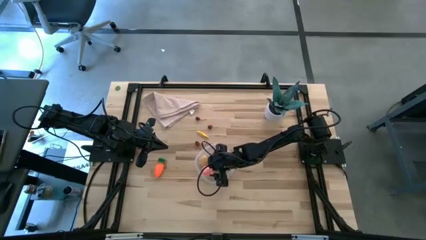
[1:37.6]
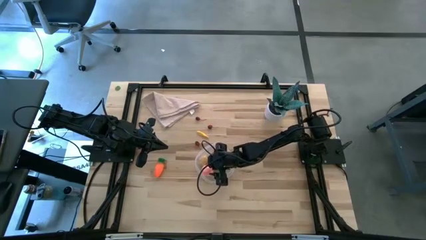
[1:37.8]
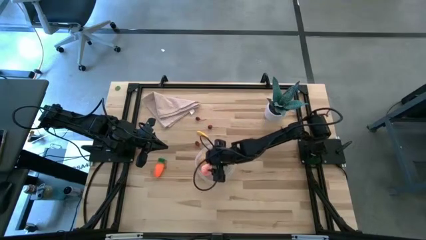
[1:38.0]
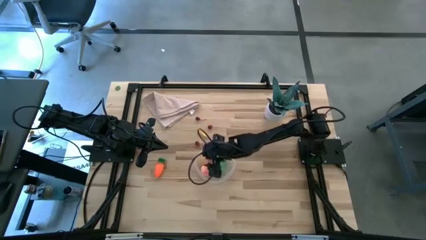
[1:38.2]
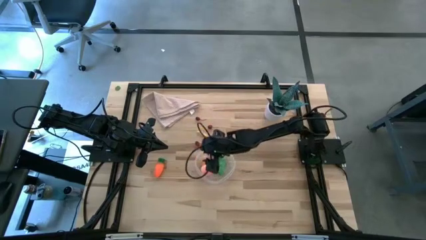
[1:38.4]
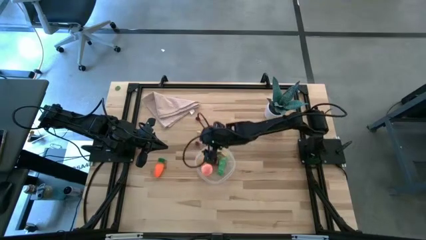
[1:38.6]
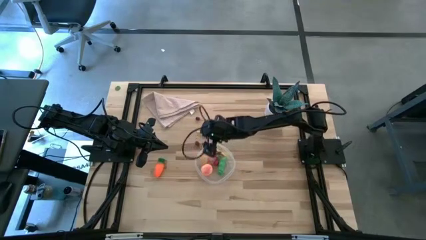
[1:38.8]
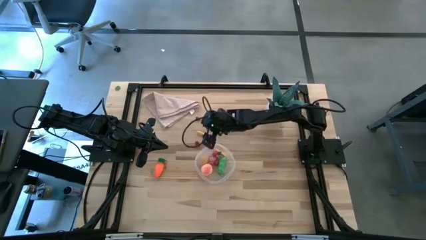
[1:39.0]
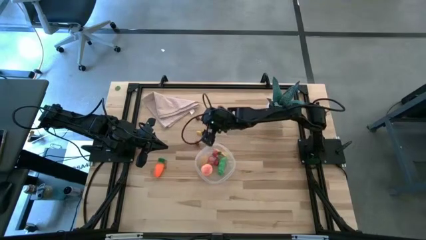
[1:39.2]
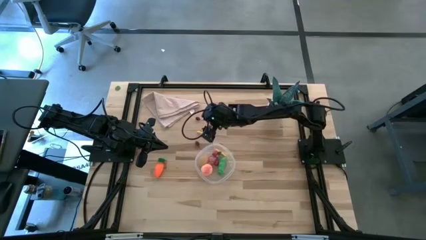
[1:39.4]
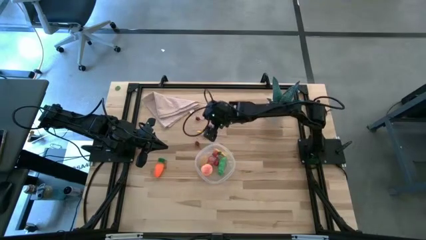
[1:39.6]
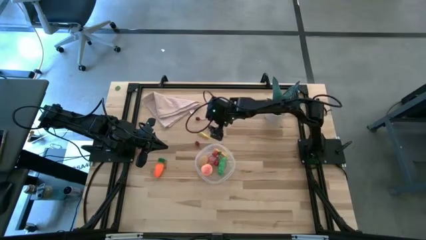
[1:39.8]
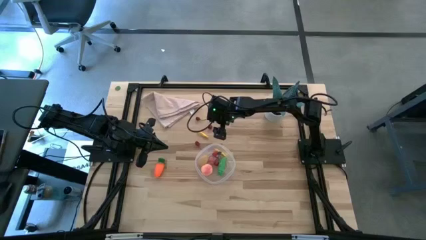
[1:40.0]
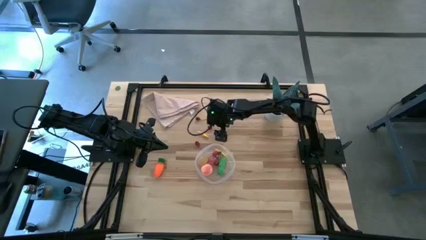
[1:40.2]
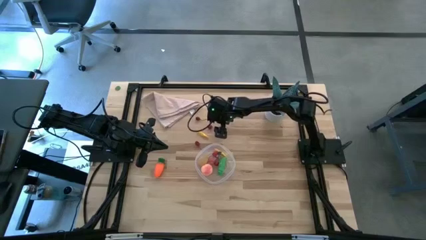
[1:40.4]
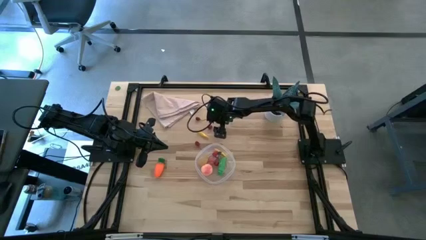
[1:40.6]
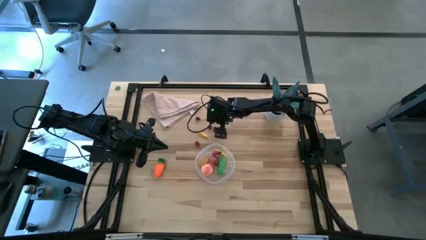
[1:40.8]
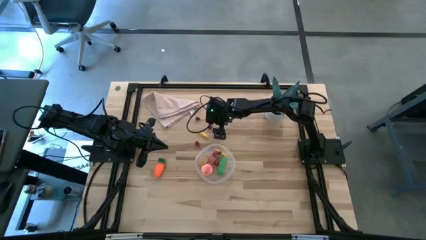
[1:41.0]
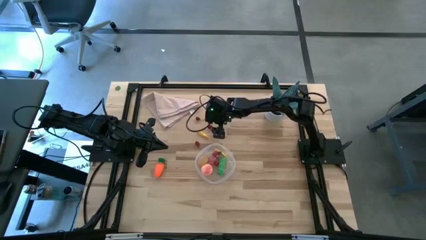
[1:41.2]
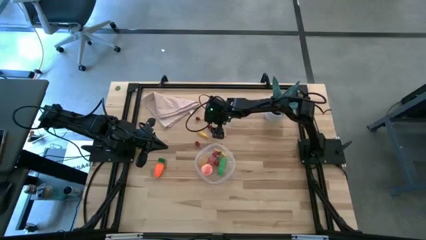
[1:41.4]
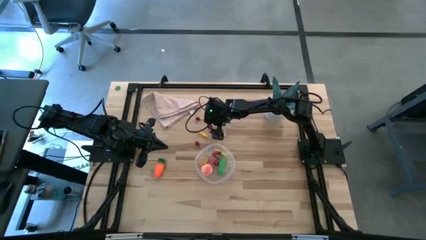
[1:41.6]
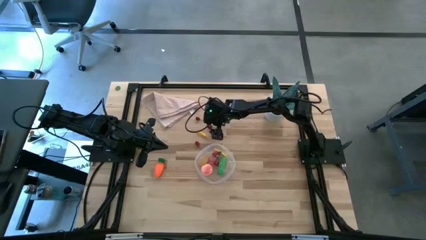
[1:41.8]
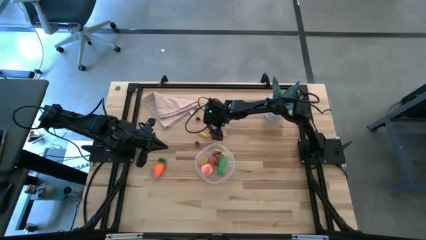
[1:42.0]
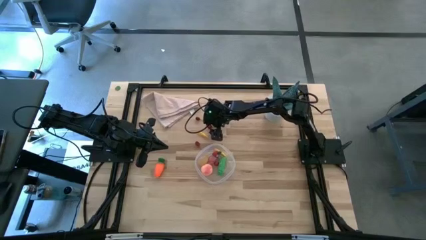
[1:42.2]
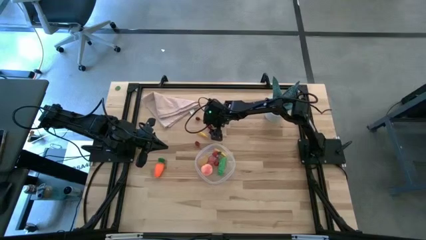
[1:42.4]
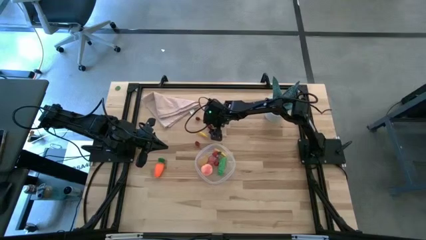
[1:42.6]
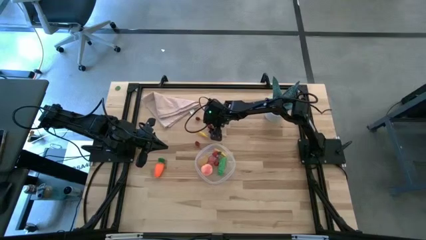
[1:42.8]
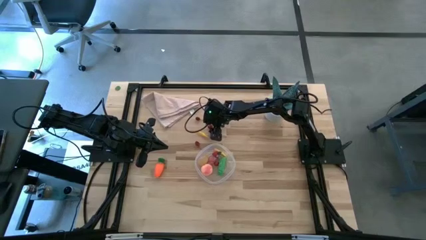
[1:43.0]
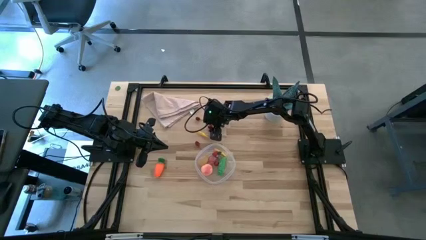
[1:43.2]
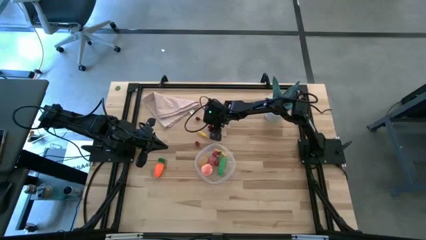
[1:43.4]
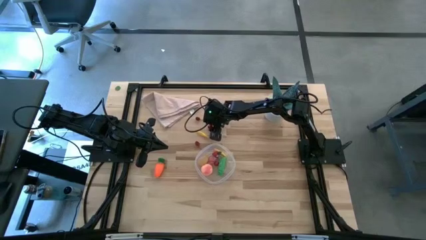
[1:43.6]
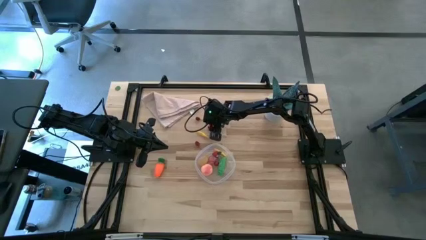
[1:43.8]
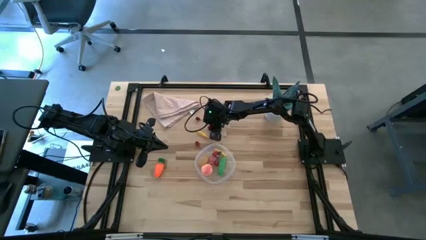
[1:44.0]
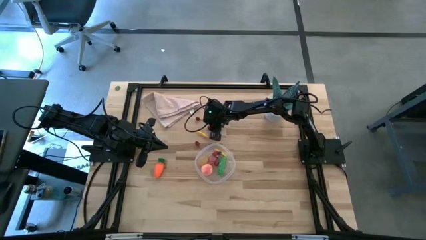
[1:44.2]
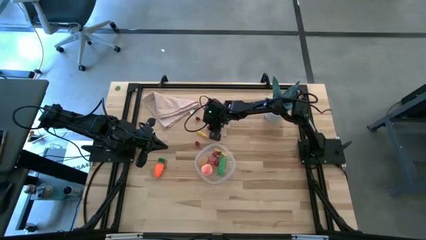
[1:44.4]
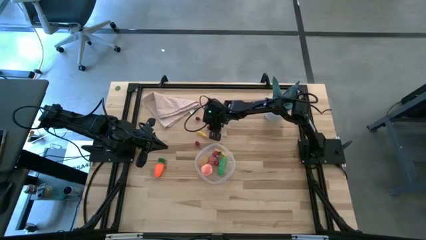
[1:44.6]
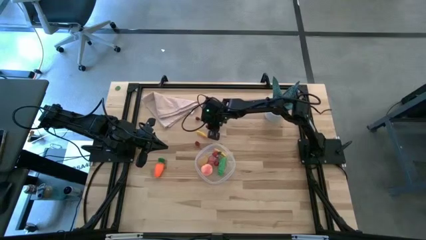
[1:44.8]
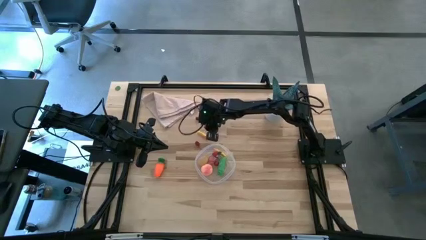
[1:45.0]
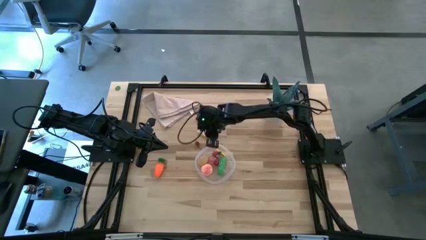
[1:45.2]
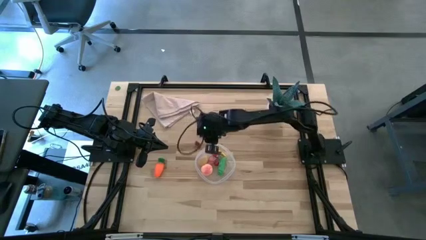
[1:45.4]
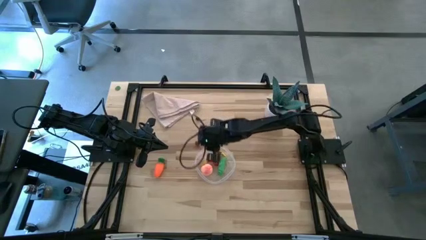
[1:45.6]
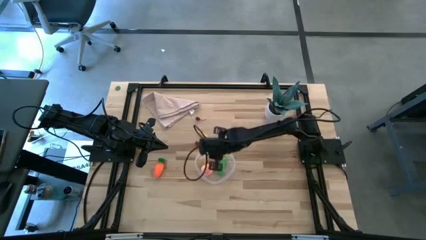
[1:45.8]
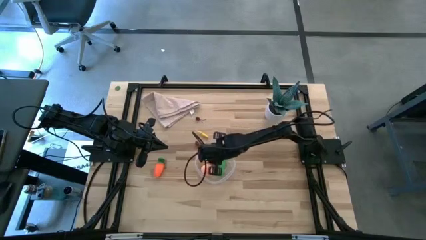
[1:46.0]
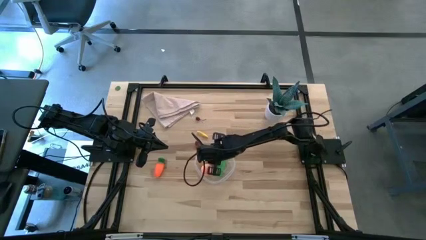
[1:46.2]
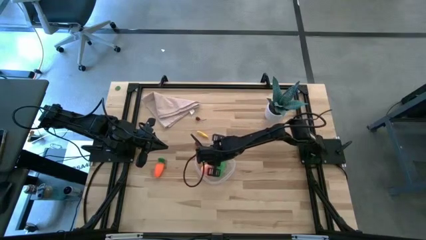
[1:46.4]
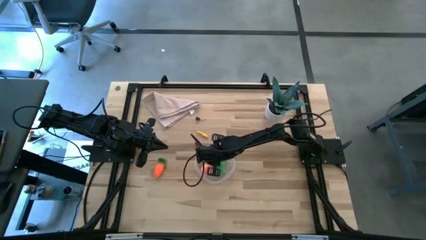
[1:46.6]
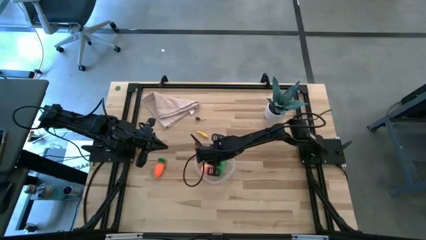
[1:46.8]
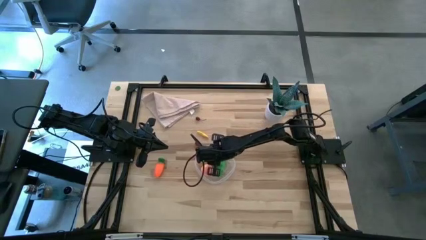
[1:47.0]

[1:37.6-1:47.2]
Task: Pick and placing Produce into tupperware
Put the red cherry into the transparent bin

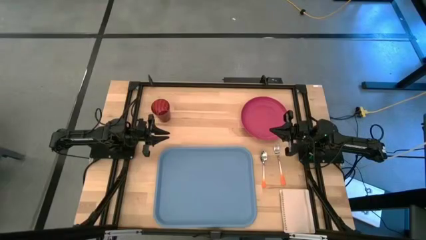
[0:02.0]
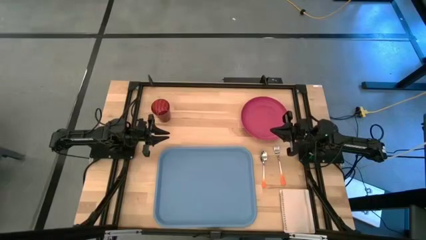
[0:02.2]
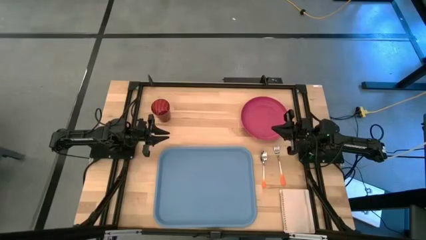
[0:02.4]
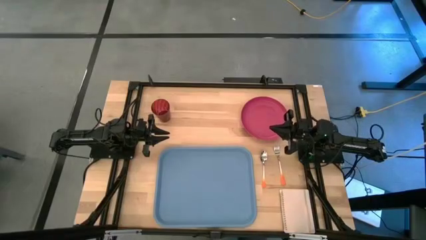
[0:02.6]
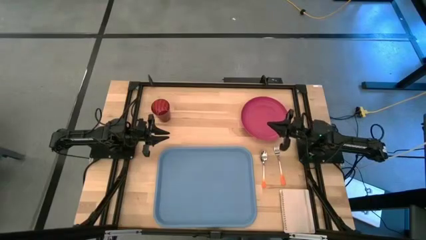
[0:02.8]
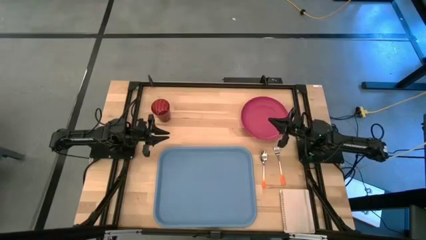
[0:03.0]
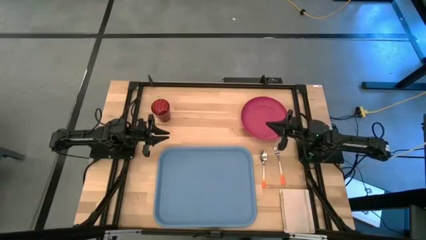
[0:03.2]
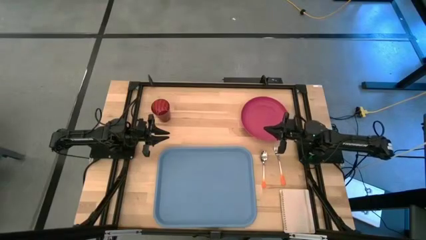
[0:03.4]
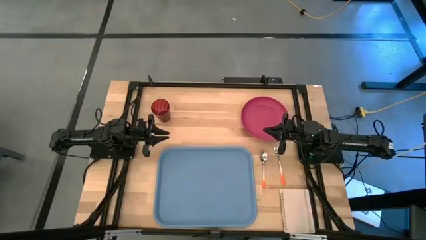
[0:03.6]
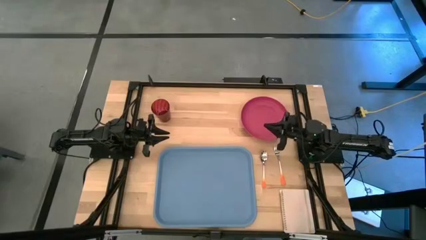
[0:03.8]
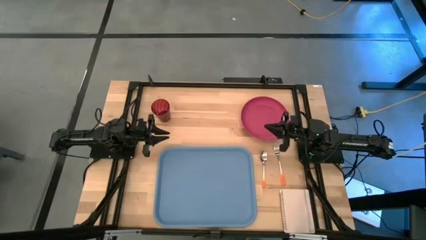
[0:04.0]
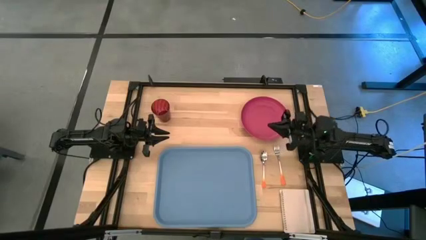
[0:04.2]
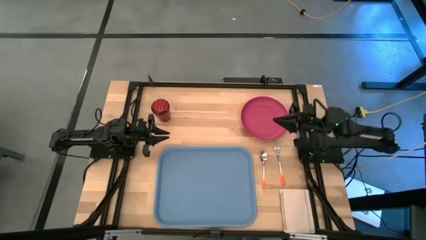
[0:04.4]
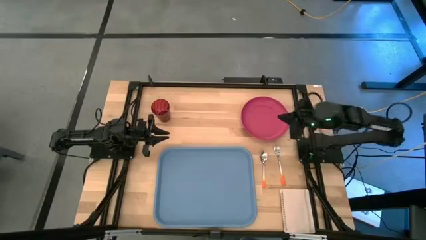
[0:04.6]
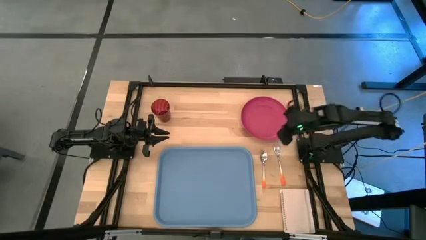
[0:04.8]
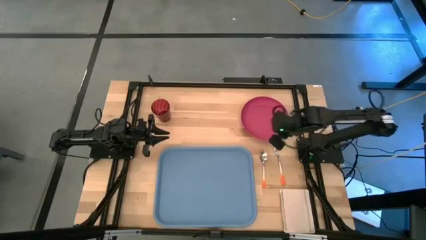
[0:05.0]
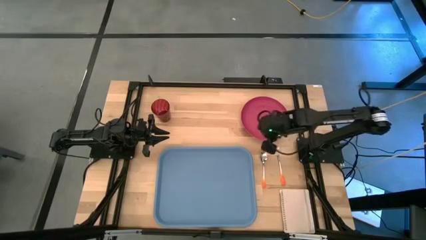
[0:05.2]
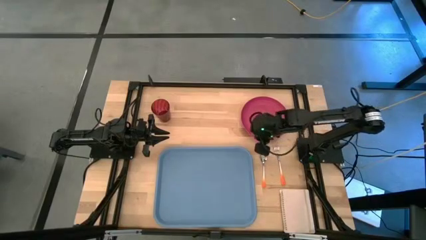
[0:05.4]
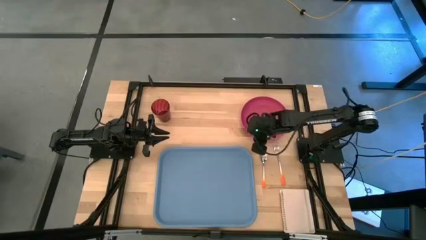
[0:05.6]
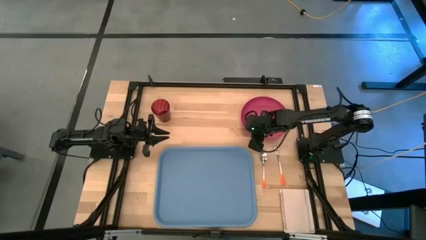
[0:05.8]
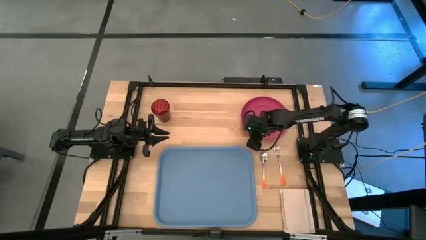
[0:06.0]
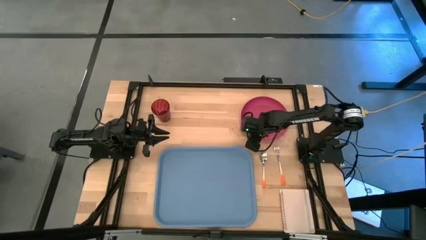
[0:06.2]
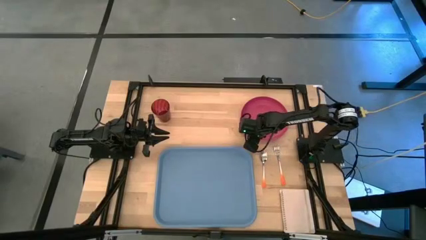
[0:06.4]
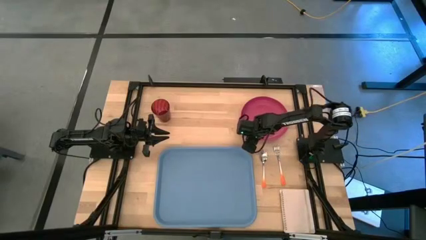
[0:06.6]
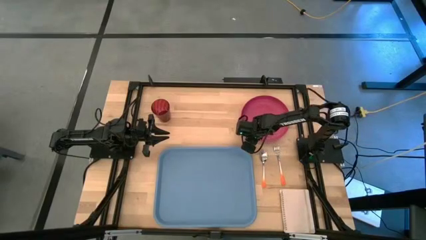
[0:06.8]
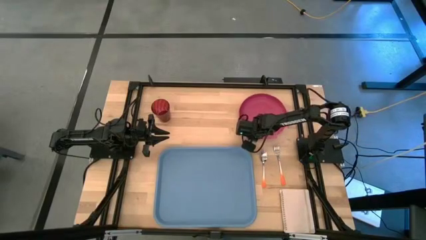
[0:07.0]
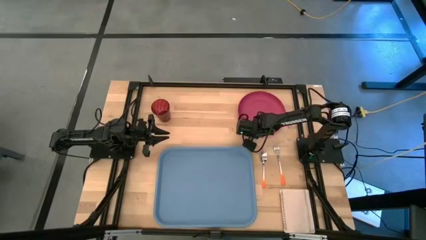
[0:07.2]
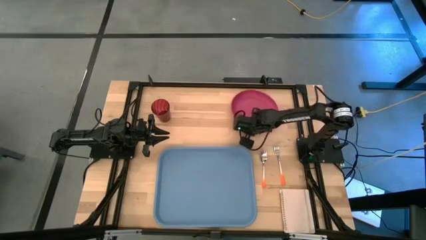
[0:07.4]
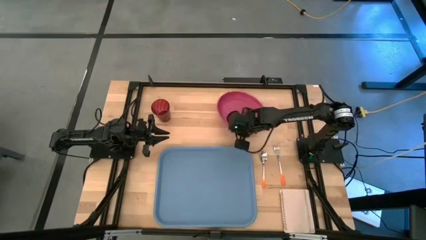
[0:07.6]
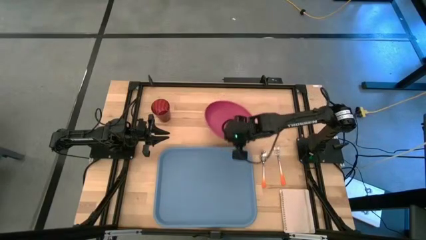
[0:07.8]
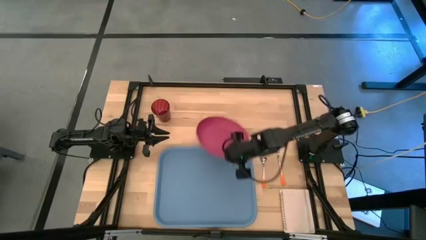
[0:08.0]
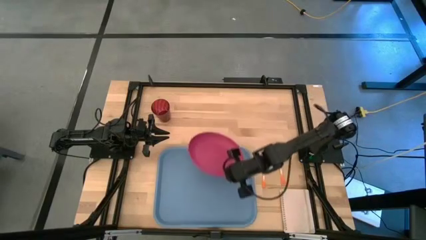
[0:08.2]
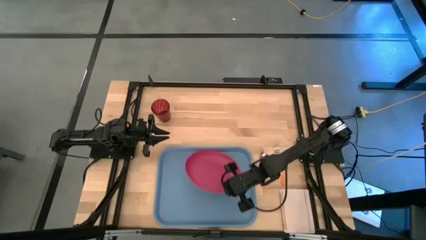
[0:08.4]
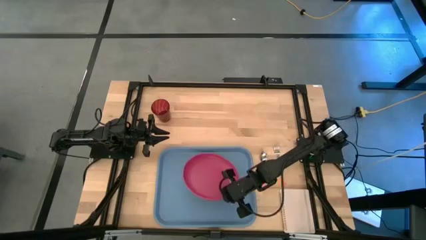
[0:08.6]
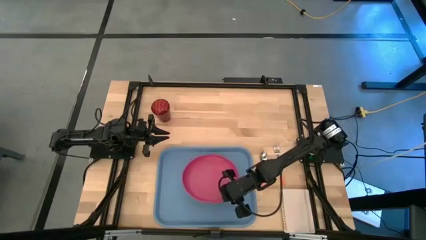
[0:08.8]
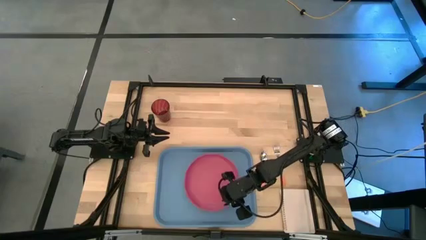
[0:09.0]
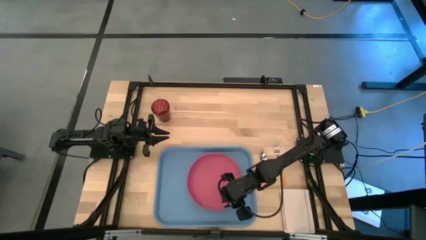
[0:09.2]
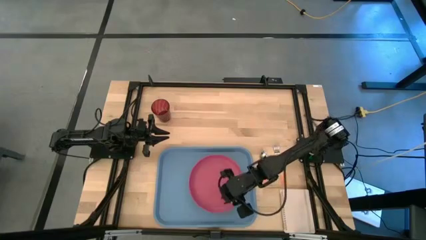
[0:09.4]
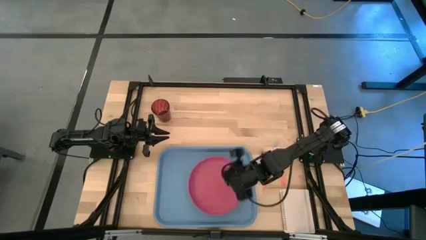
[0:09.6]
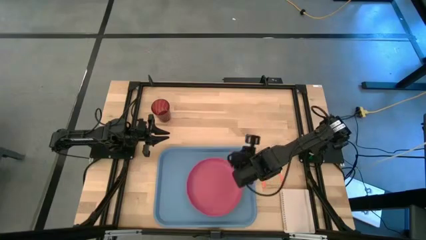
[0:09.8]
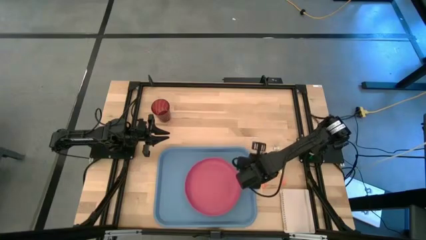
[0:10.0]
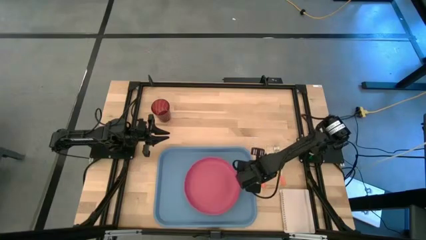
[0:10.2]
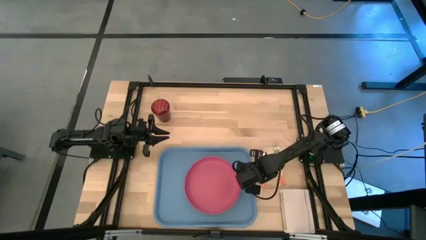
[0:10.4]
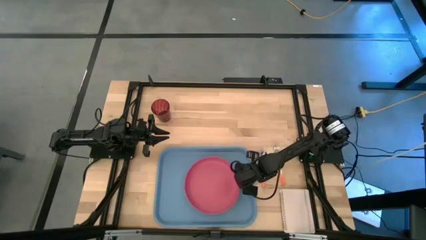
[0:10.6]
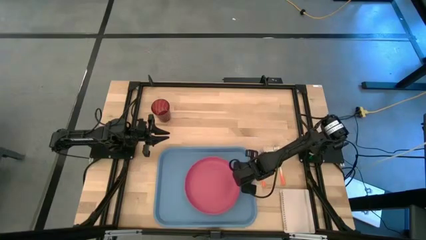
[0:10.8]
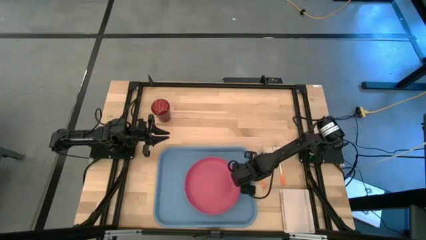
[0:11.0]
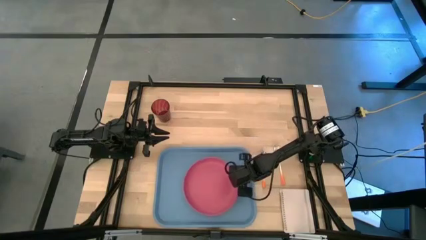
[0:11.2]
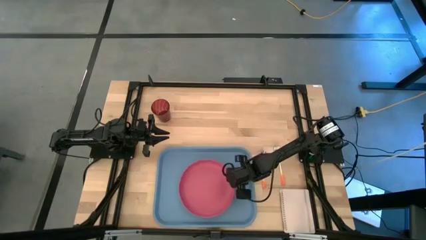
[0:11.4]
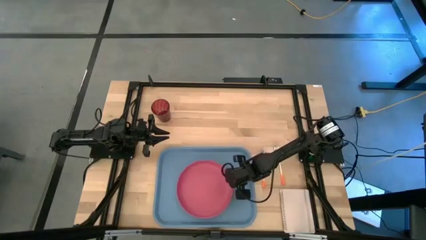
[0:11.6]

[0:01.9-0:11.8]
Task: Pick and place plate/cup/fork/spoon on tray
Put the pink plate on the serving tray
